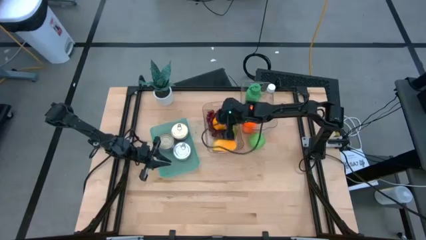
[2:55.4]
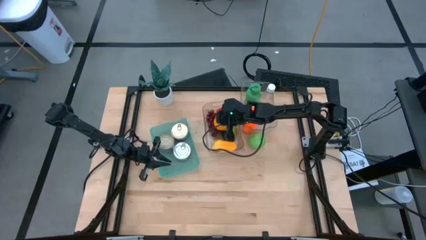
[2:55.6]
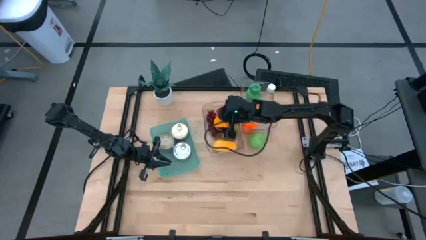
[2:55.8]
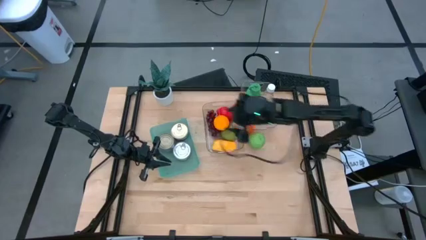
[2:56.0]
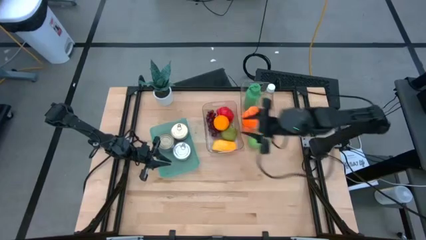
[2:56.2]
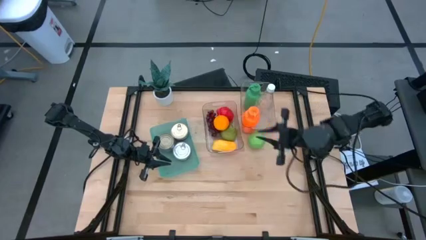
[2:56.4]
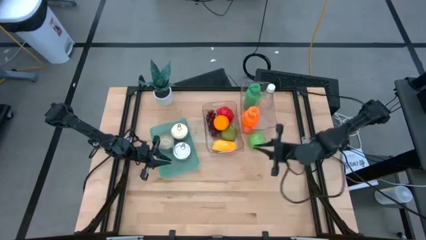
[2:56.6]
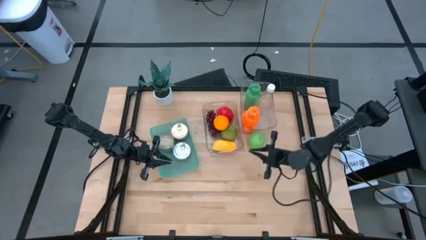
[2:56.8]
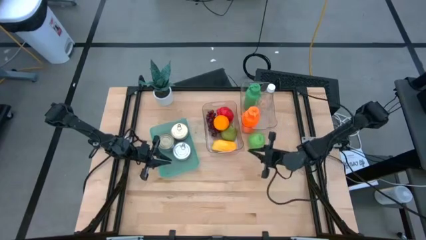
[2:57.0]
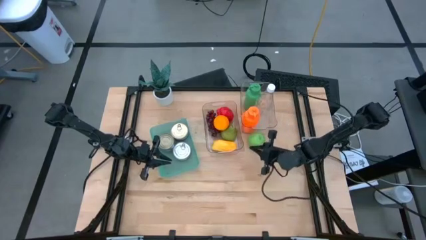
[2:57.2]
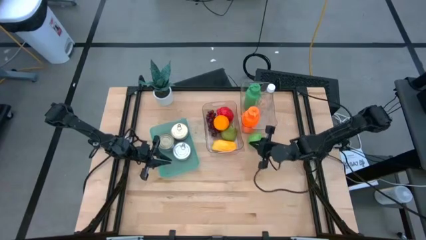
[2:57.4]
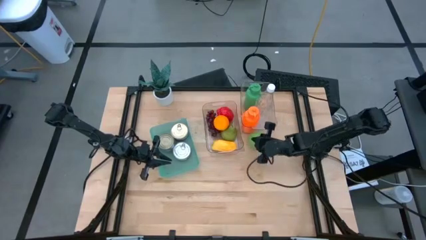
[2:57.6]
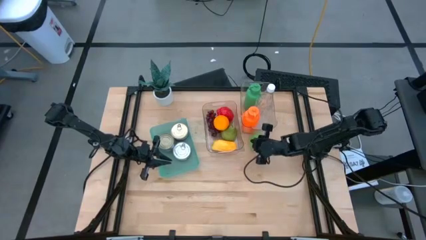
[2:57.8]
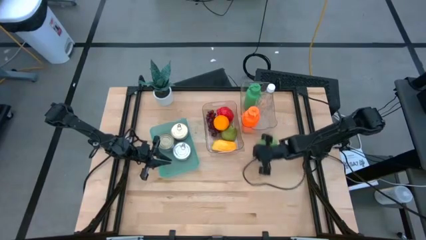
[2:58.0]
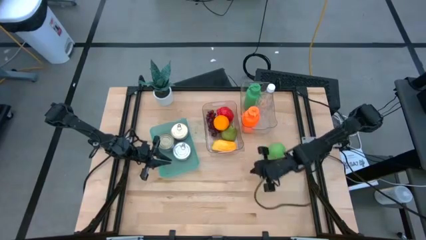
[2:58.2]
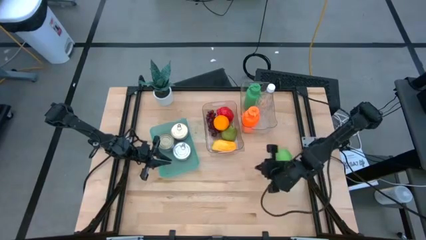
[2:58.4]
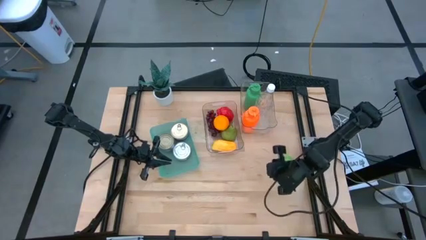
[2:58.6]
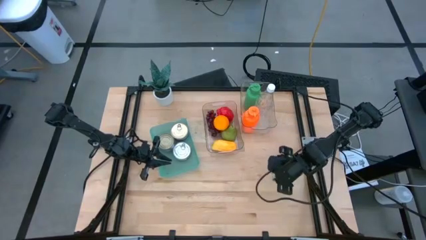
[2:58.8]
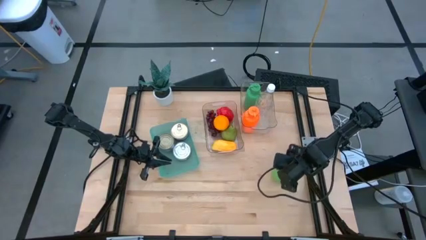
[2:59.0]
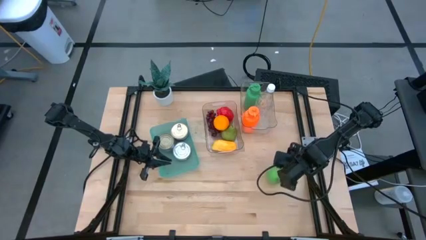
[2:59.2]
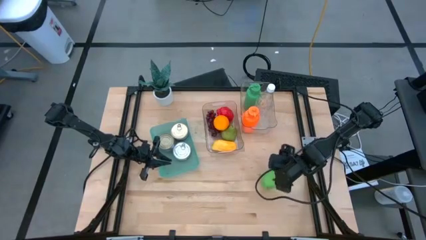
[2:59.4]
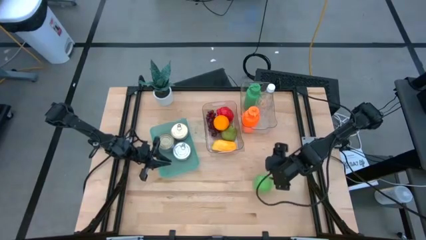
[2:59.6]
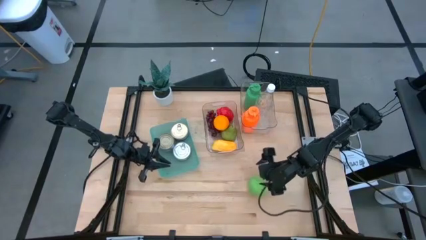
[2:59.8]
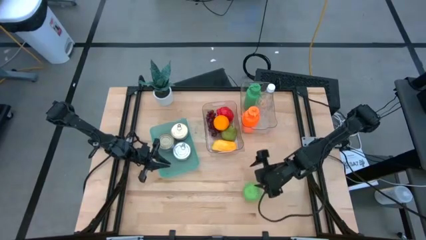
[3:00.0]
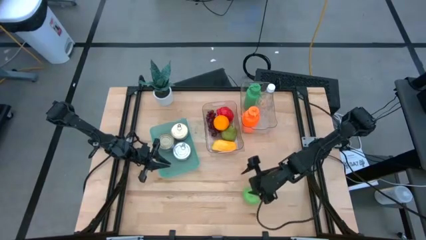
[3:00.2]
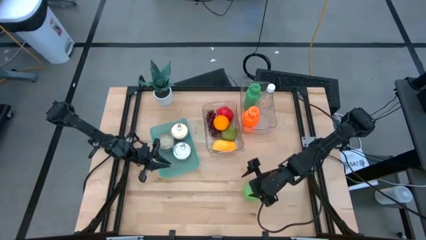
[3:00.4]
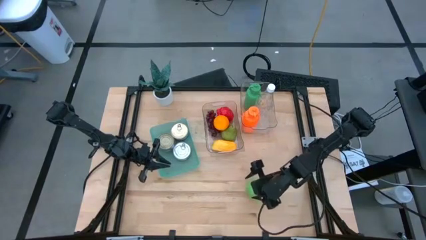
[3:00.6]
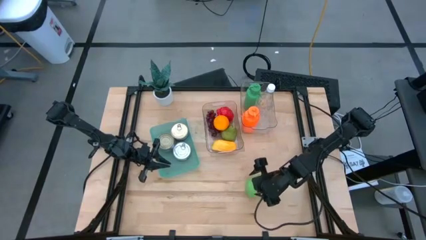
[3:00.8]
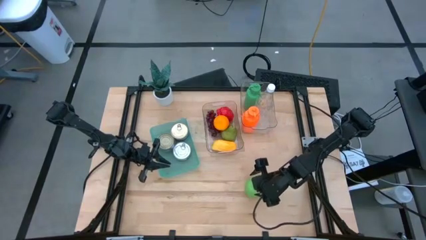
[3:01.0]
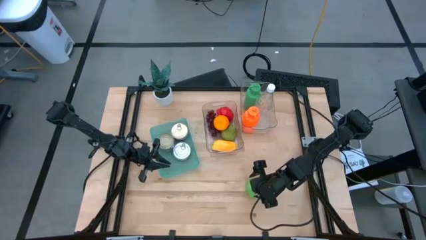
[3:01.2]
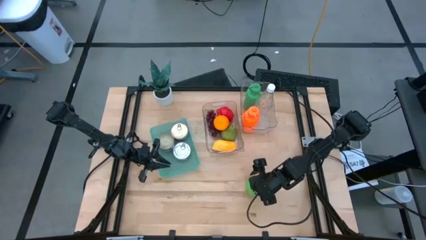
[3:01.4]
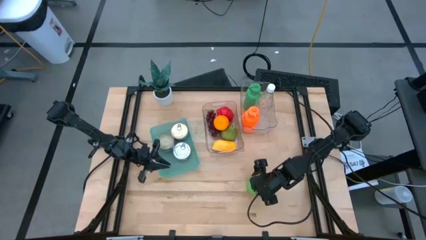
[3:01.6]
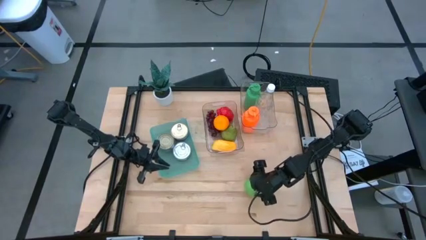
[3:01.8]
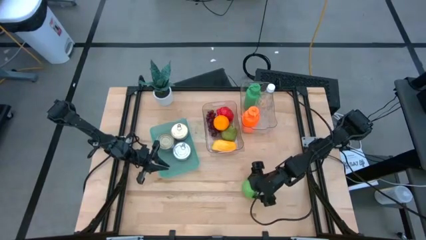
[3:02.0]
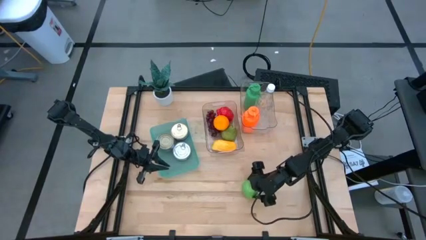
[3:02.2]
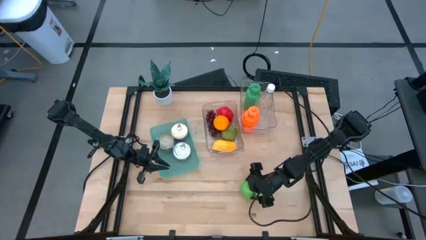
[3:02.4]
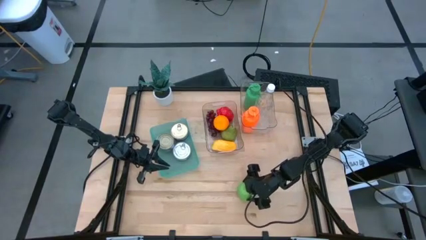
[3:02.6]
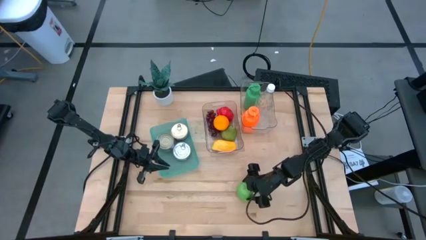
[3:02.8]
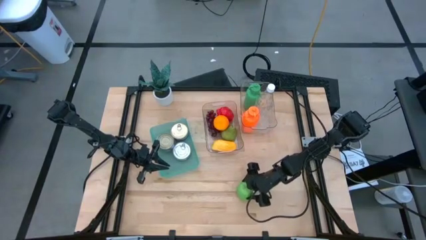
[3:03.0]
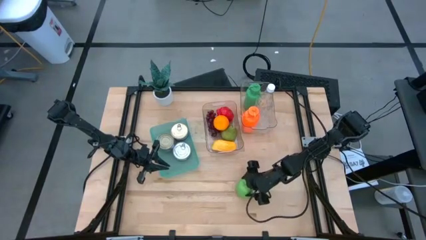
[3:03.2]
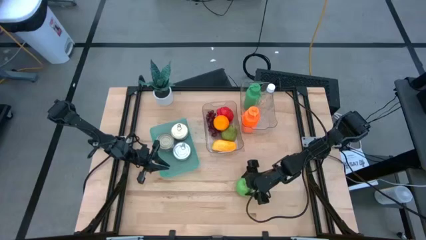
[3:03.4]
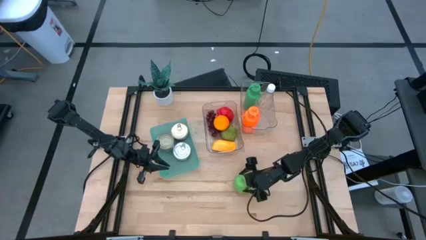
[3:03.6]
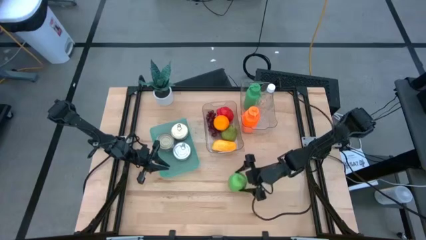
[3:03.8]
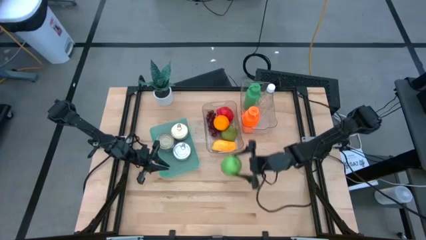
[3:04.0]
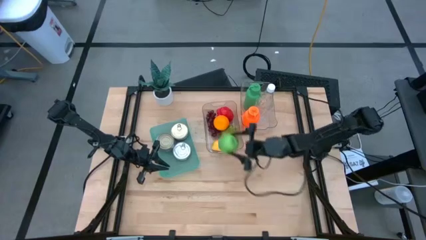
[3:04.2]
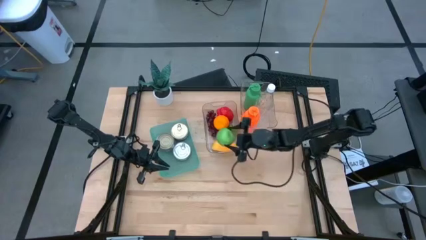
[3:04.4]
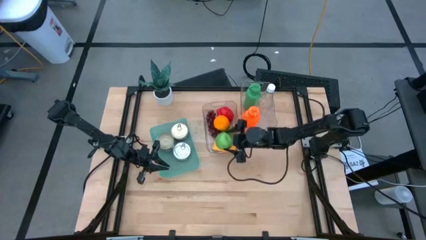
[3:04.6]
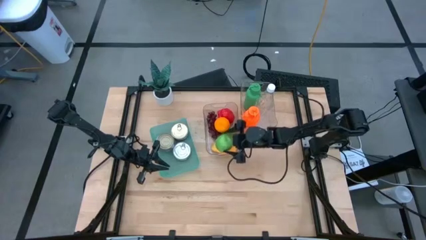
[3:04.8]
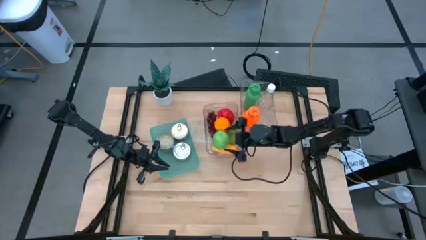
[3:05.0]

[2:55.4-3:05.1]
Task: Pick & Place Food Item
Put the green apple into the bottom transparent bin

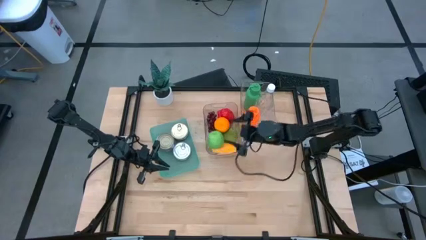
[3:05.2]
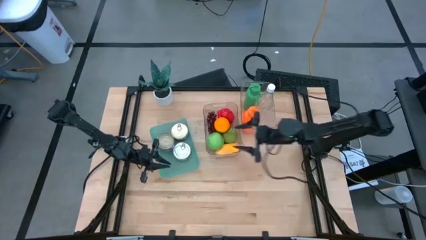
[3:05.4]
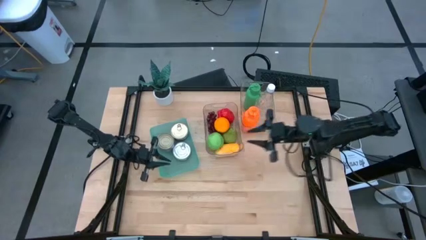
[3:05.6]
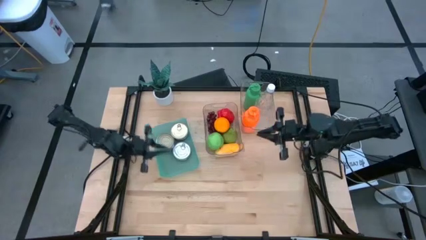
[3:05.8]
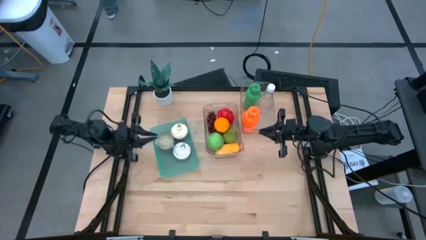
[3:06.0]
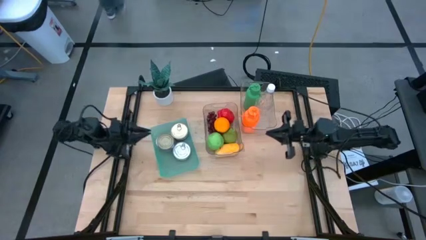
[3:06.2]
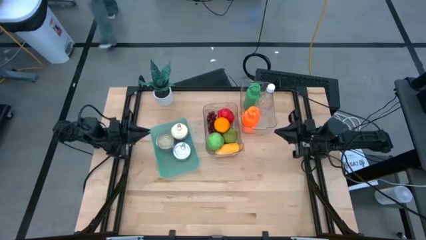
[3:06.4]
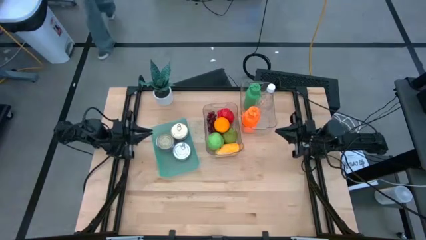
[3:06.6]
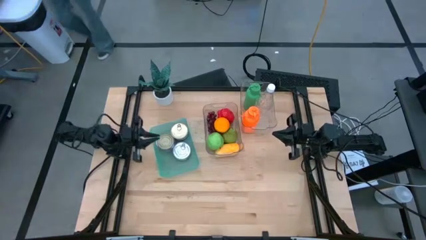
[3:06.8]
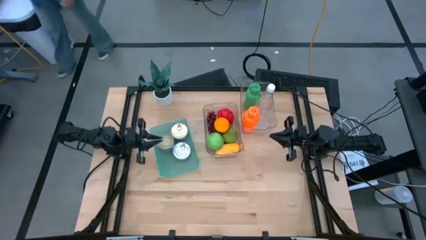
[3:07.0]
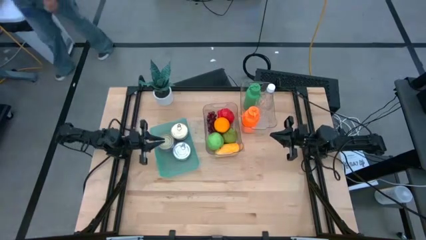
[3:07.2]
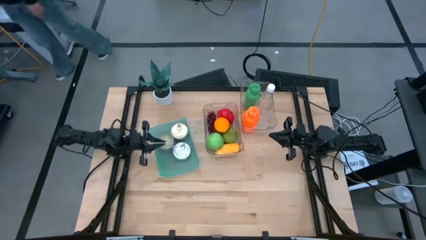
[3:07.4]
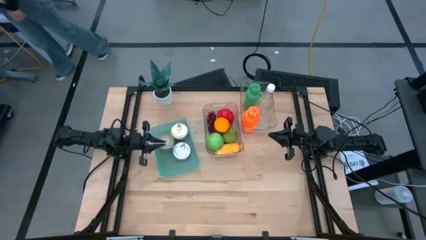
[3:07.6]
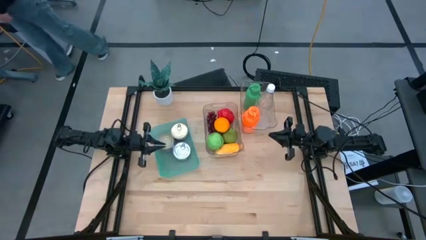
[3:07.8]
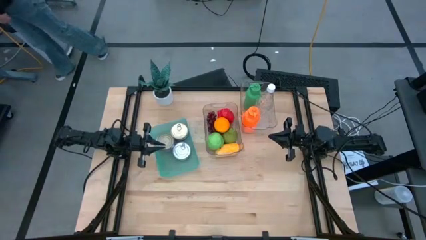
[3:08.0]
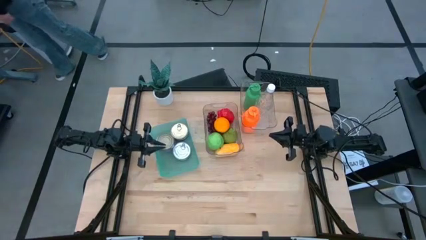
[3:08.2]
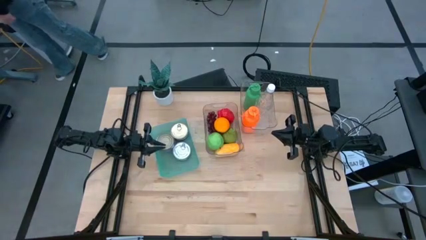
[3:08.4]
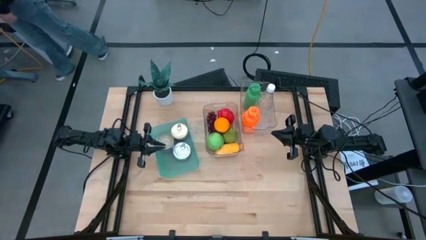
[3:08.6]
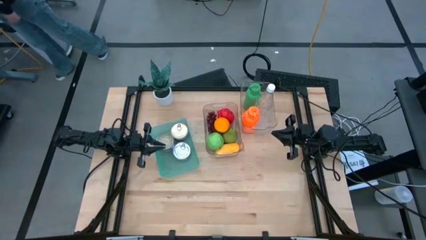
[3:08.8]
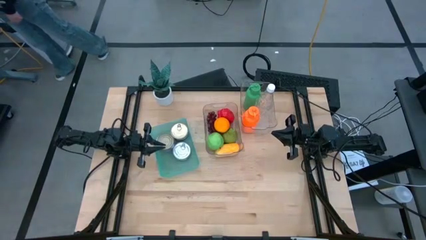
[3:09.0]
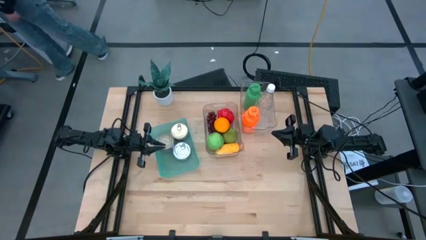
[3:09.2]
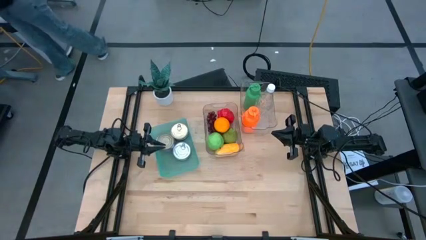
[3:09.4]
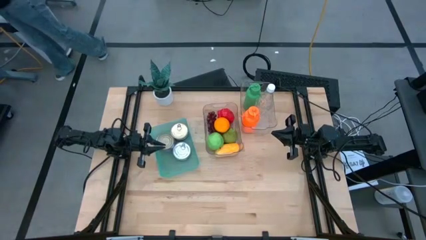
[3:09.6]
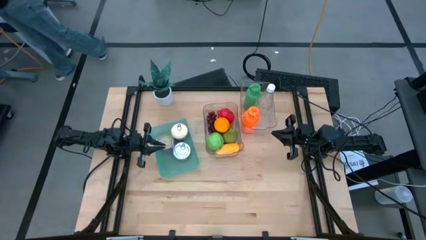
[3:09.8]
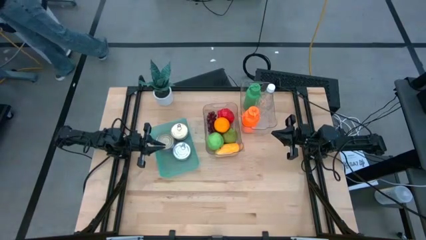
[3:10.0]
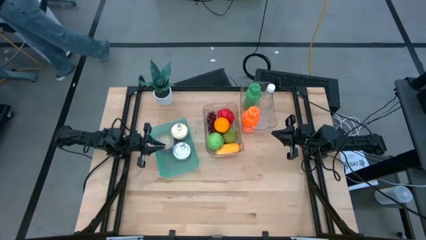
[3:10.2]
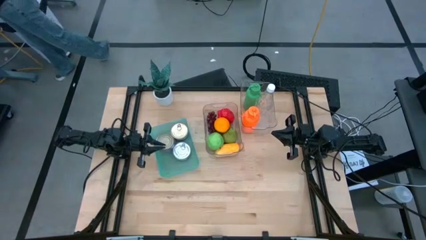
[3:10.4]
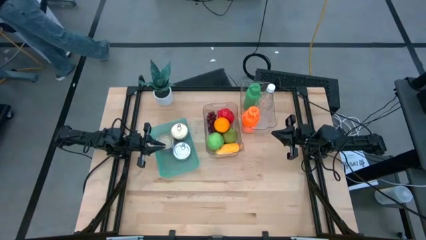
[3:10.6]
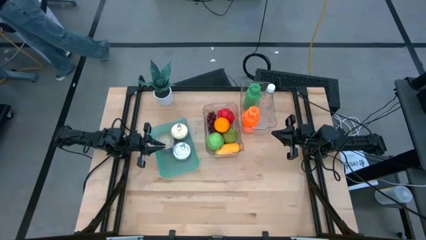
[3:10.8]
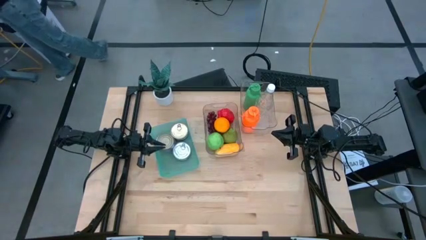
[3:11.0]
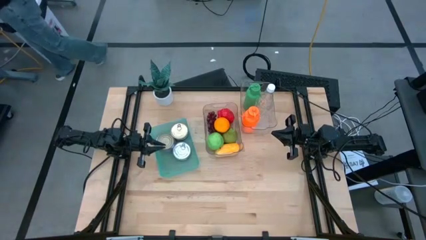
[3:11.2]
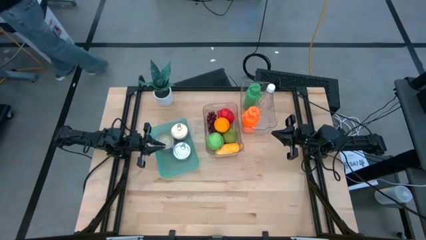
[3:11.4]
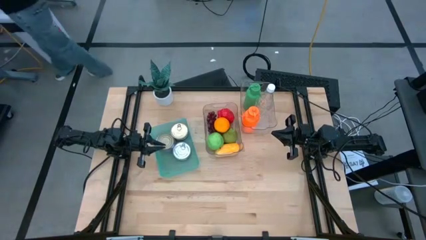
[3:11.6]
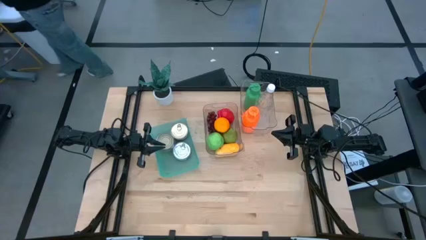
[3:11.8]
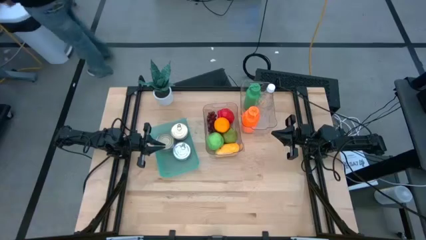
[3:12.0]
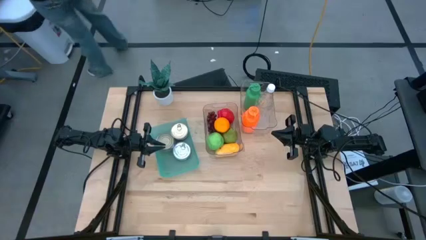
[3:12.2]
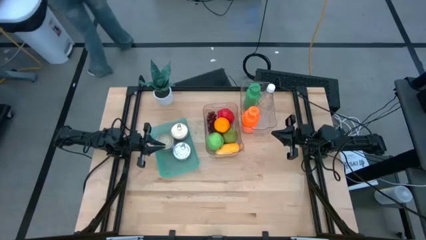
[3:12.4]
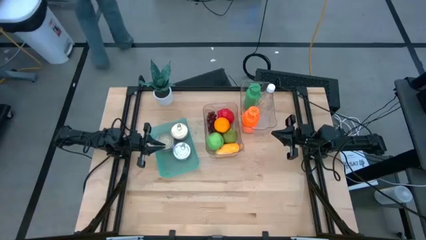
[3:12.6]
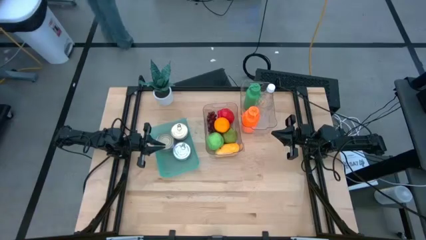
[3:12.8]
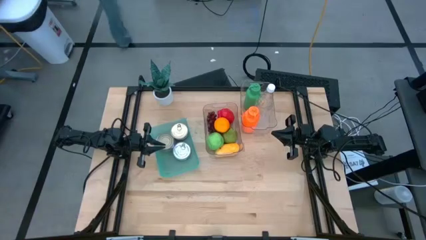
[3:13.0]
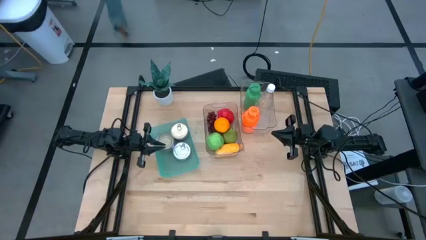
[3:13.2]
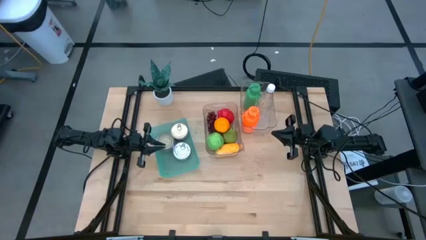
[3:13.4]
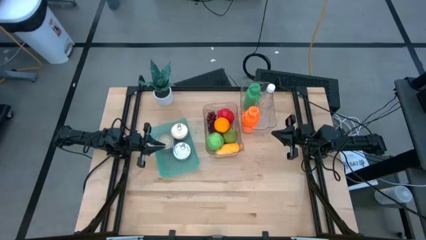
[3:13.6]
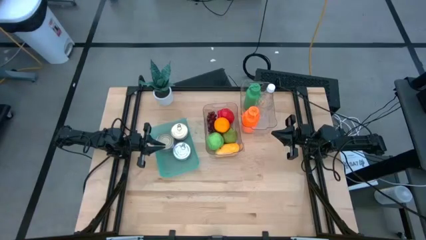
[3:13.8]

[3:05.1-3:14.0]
Return to Home Position
